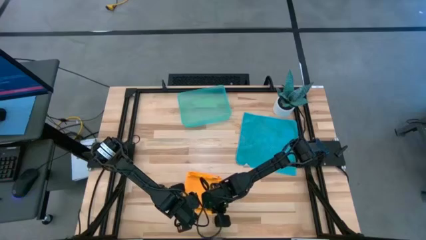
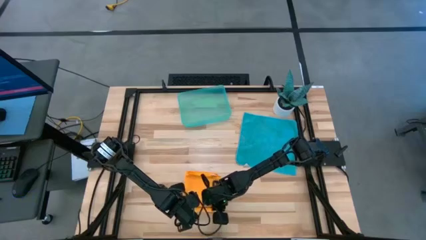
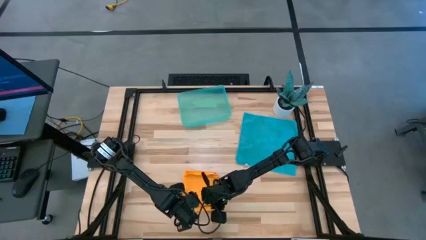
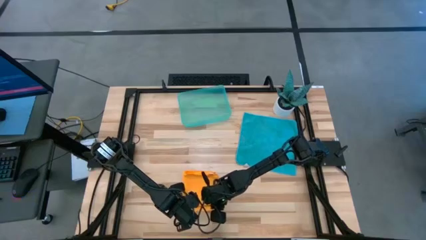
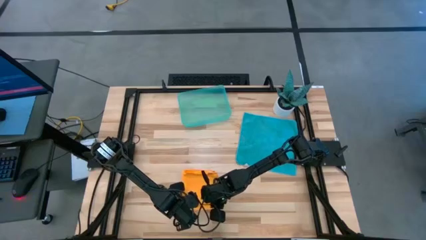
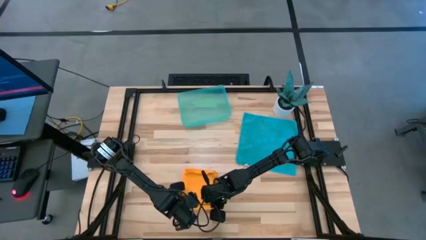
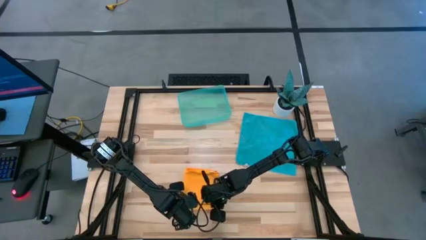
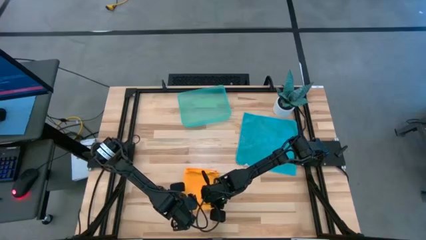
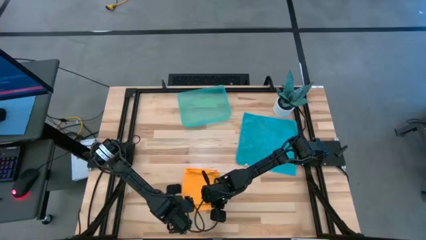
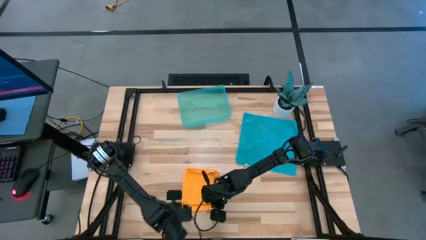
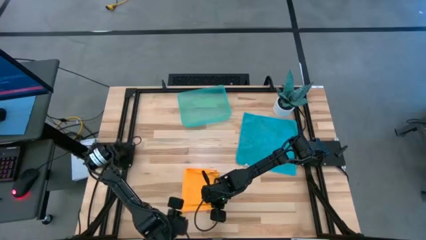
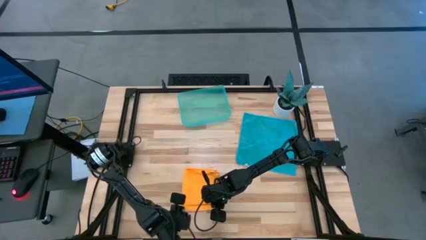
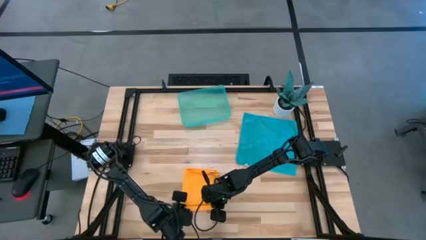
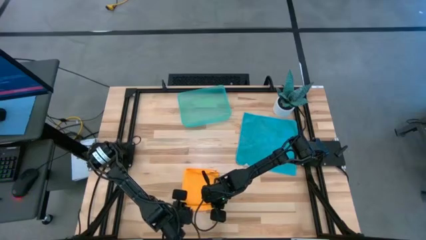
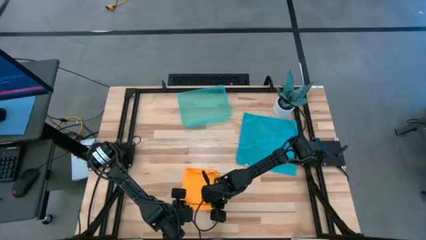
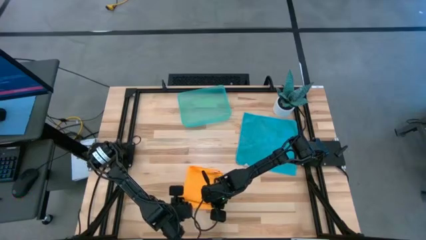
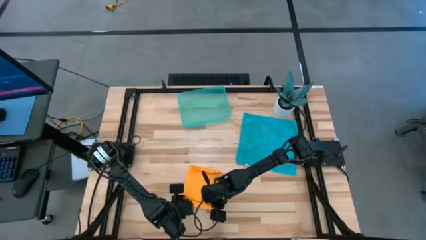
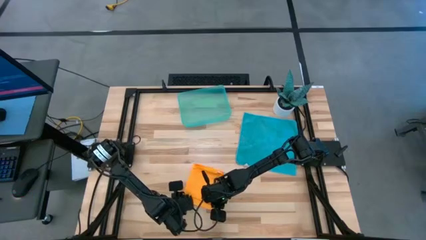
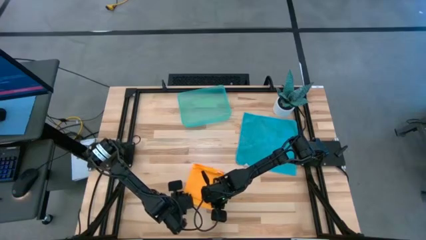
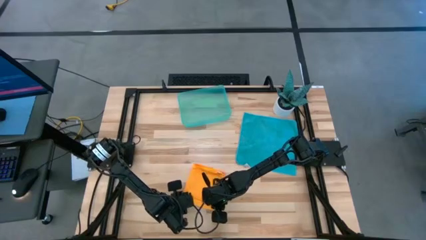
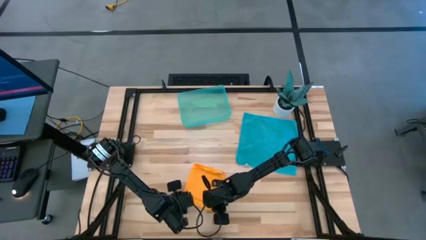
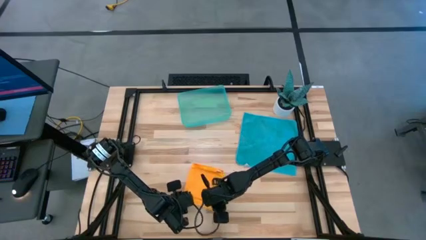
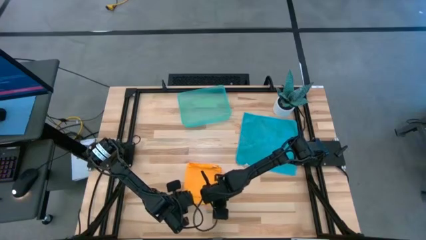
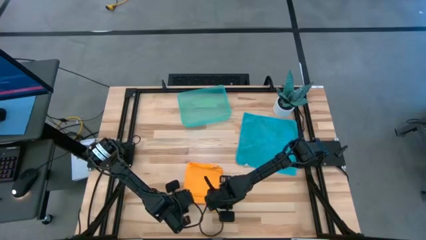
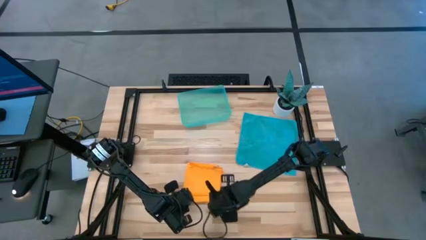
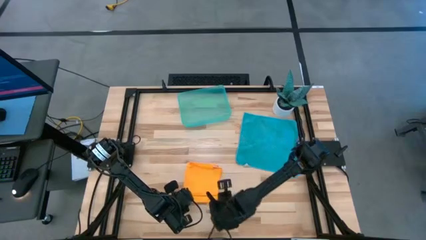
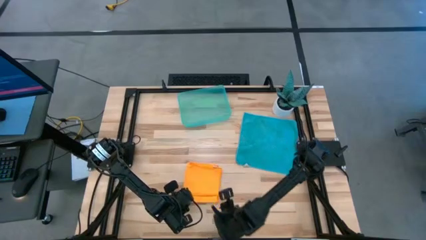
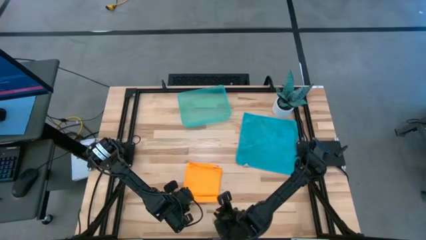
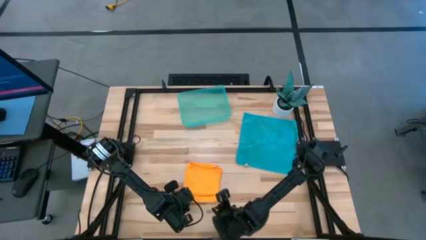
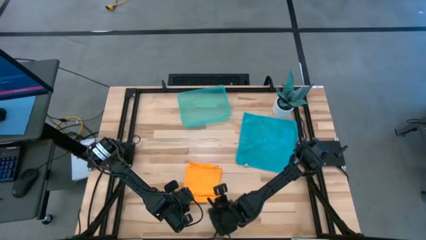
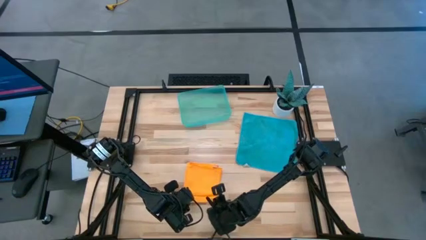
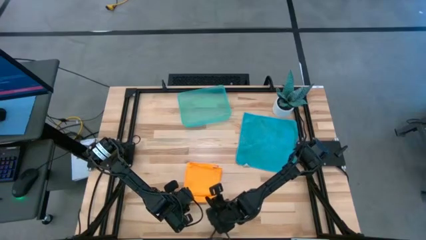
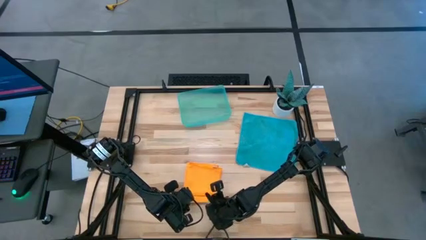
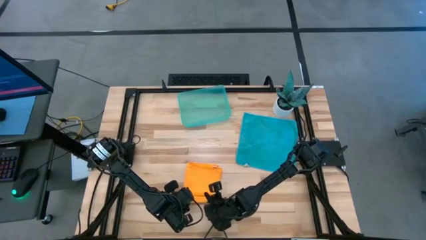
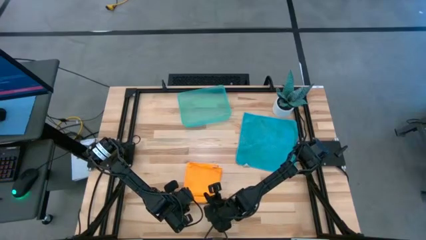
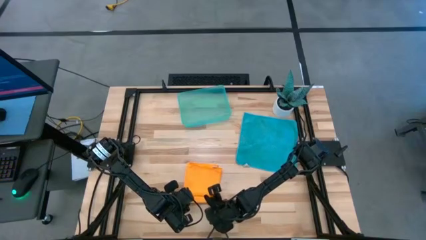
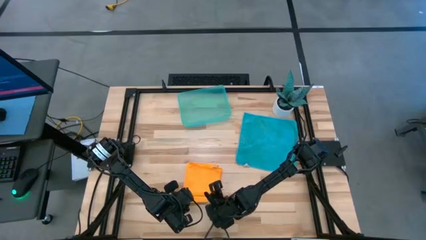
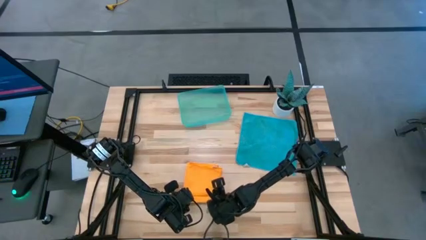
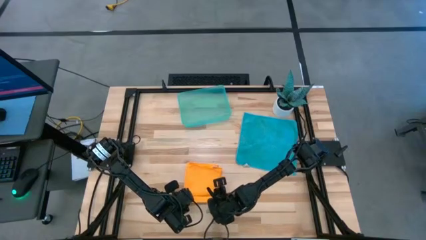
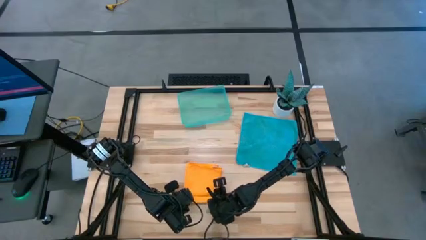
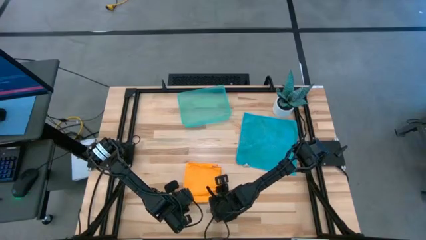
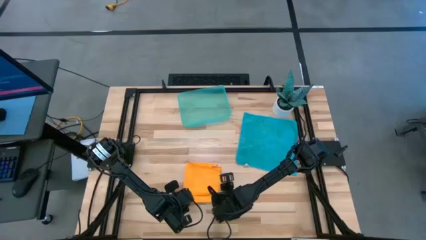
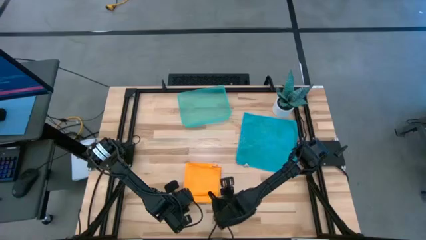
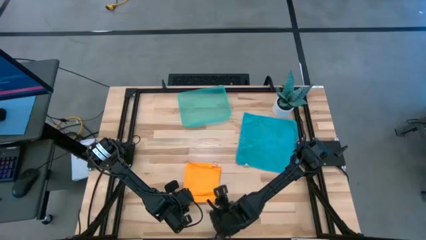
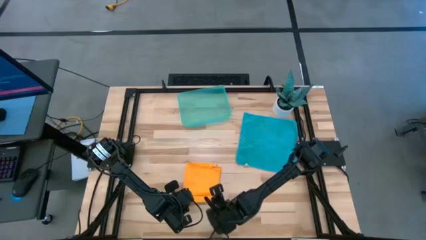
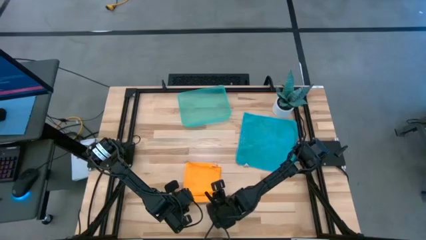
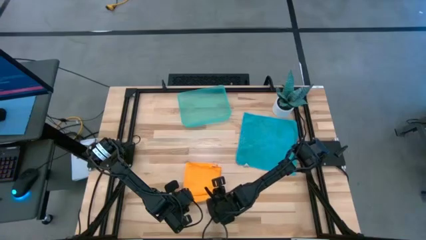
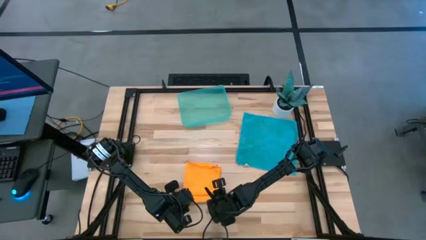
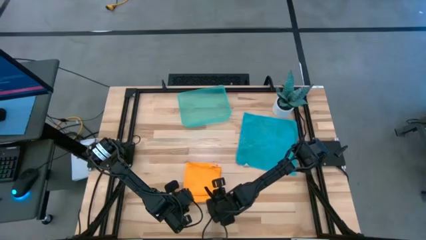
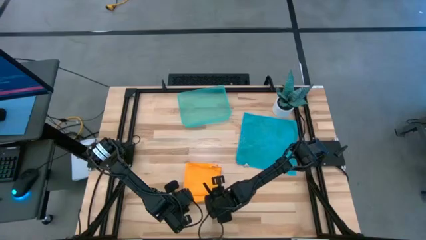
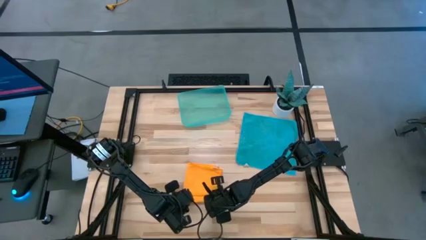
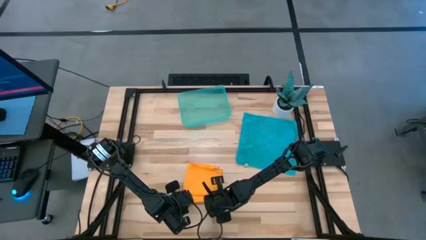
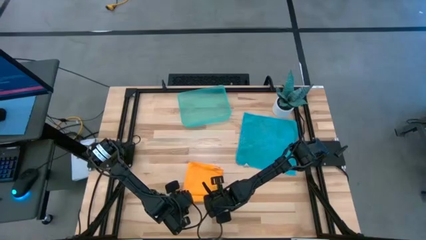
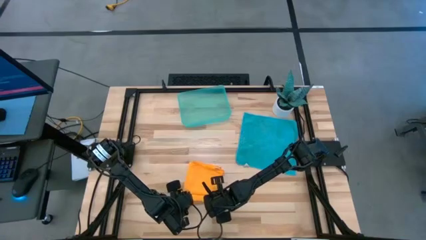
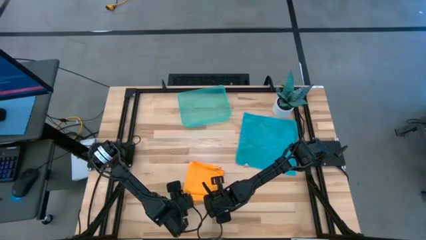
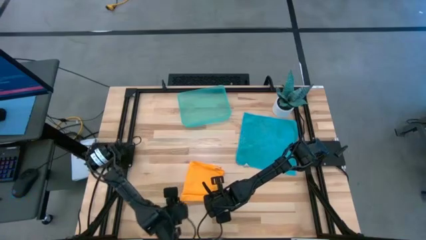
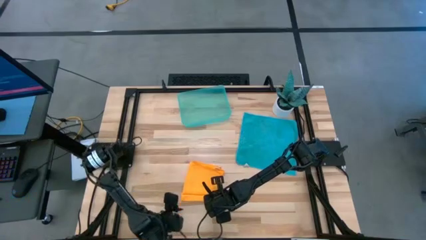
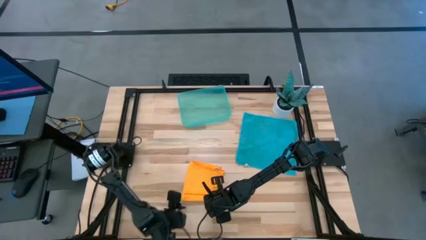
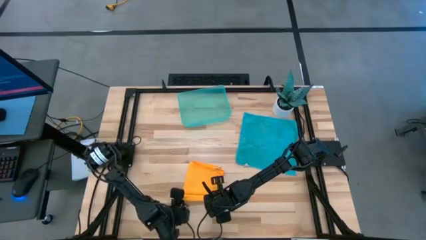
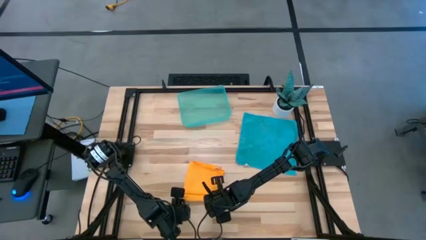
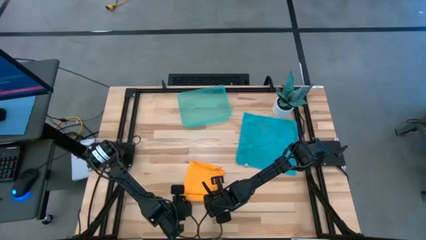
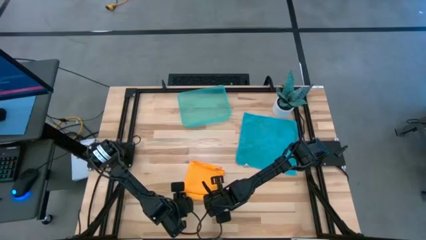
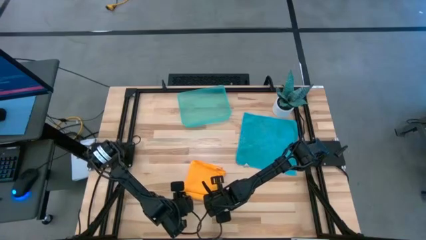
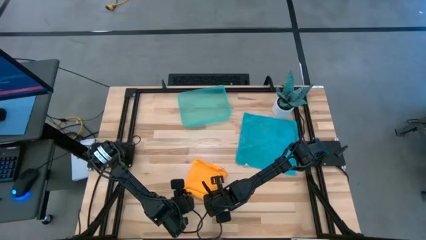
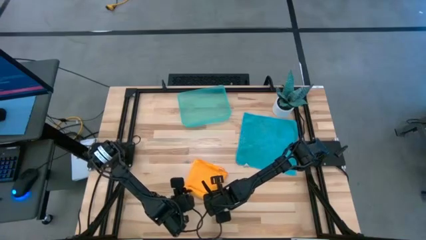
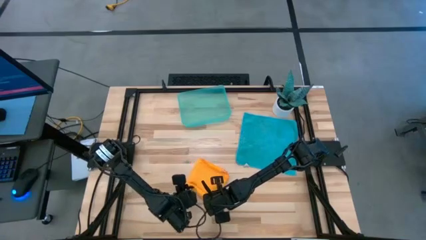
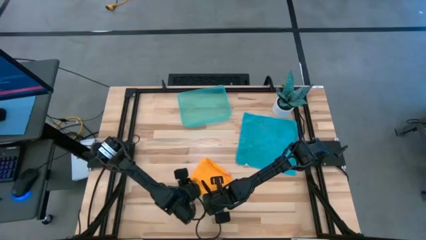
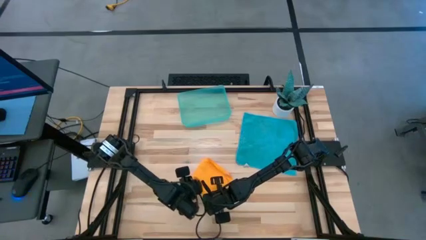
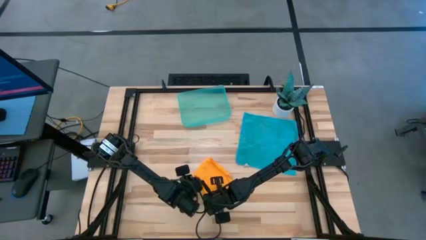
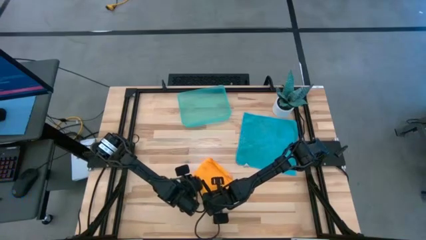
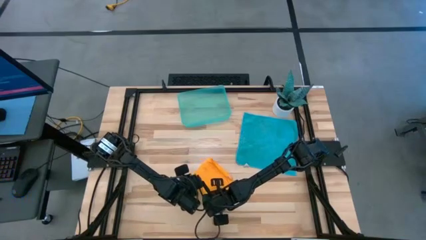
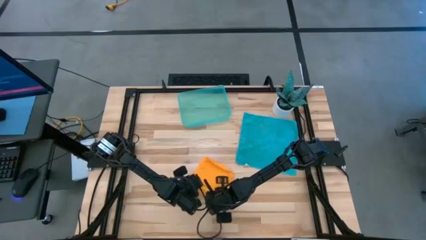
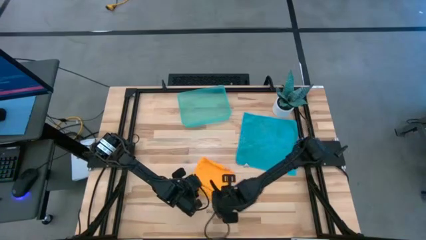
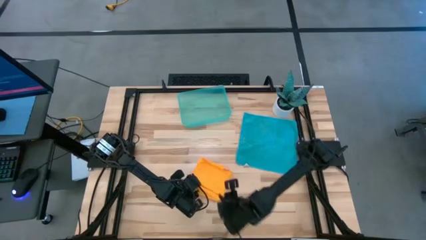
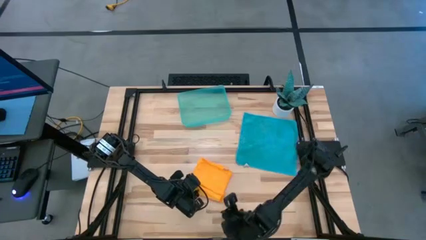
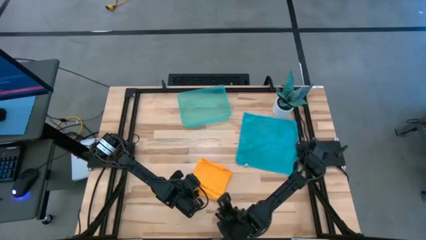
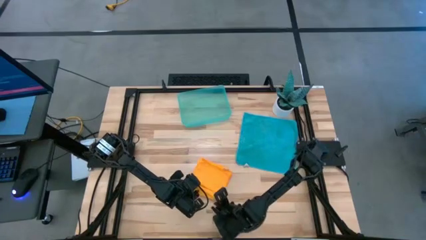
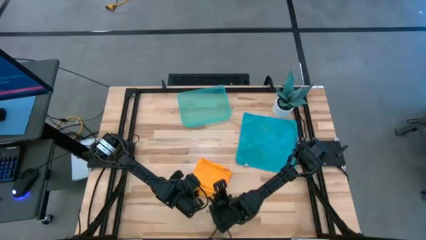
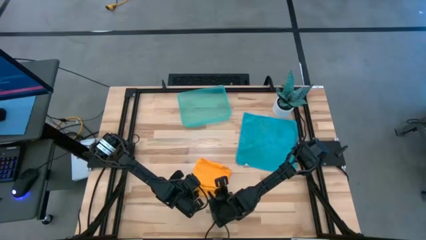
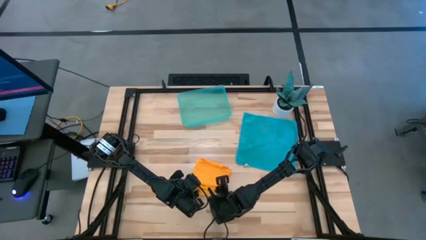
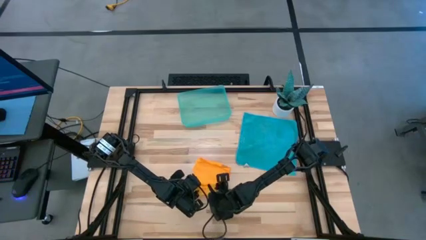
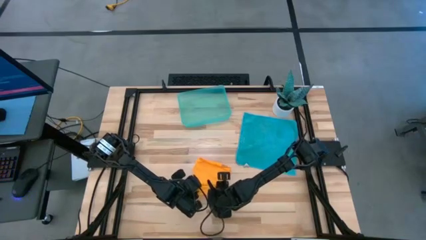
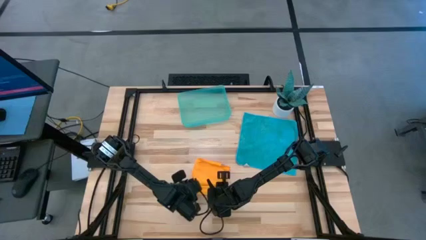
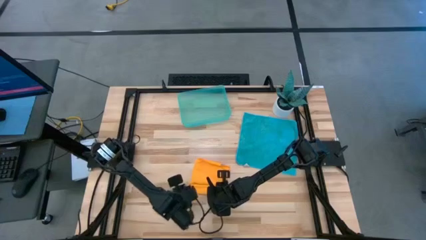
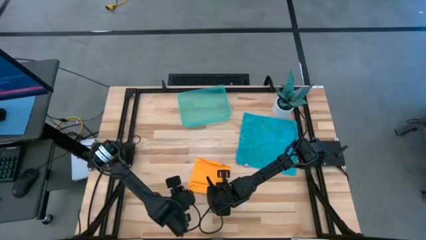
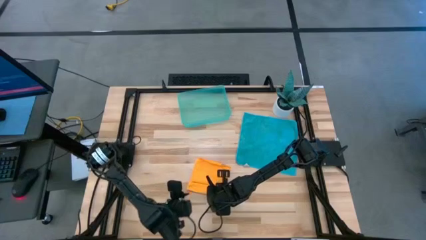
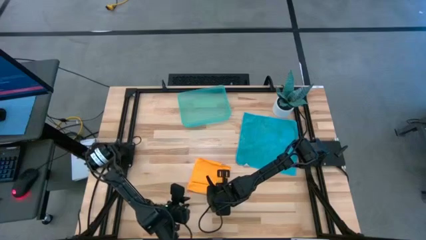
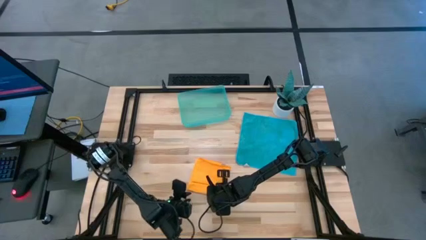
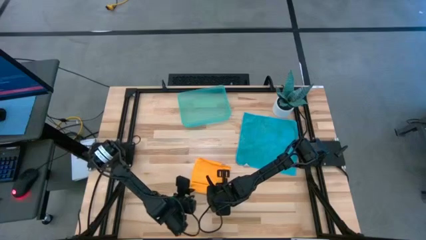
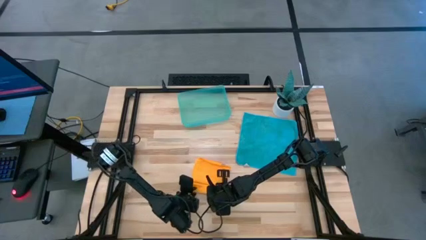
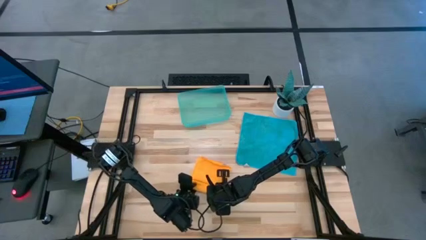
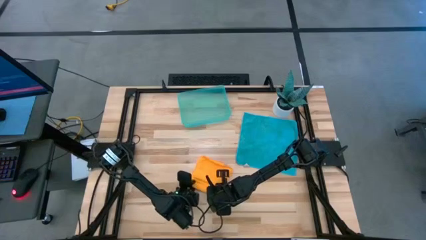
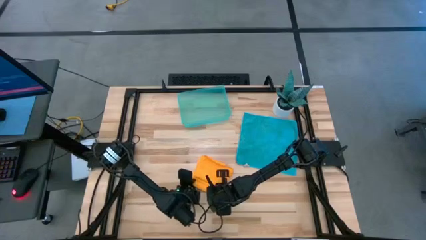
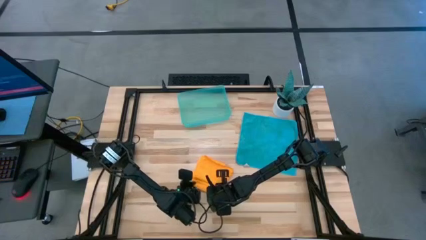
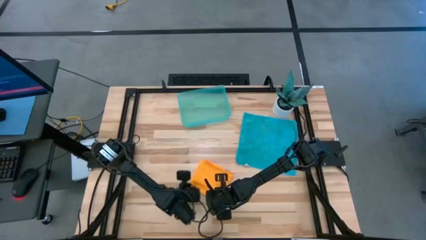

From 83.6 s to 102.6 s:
Task: Roll microfiber towels into tight, uniform cylinder then place into a basket
Roll the yellow microfiber towel
